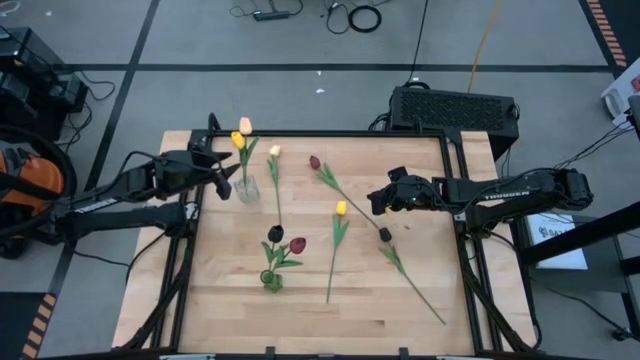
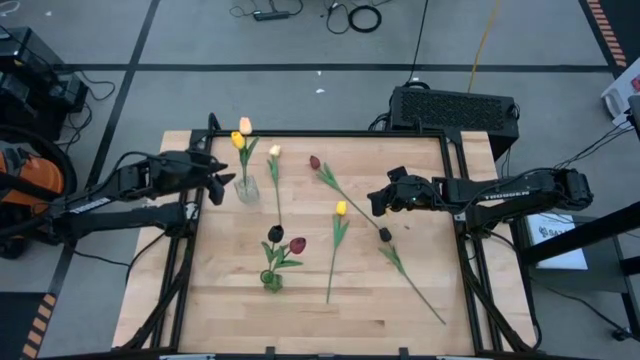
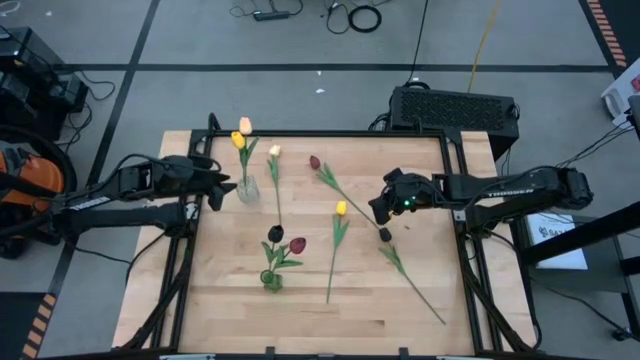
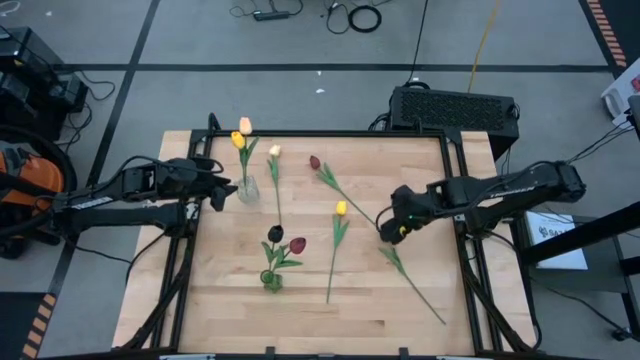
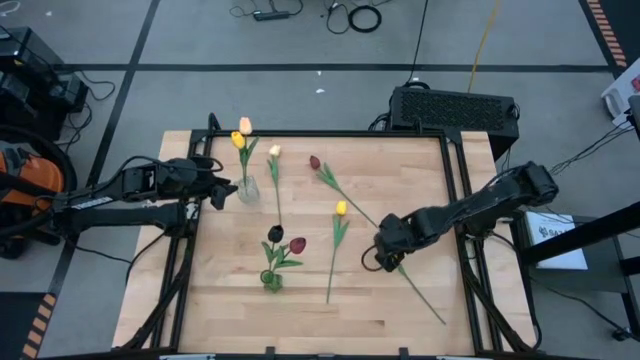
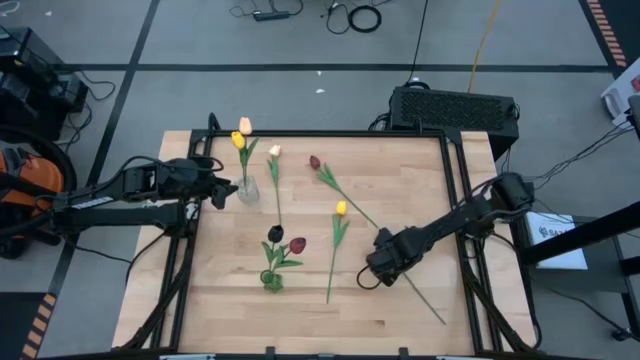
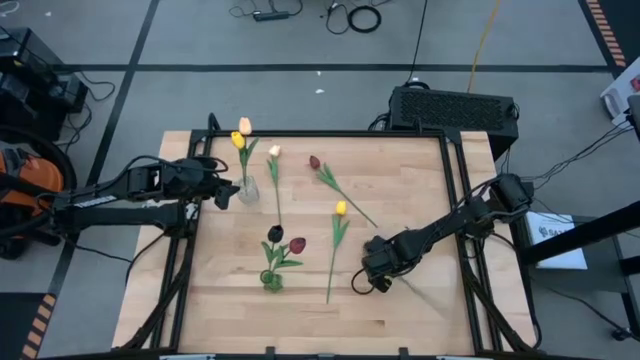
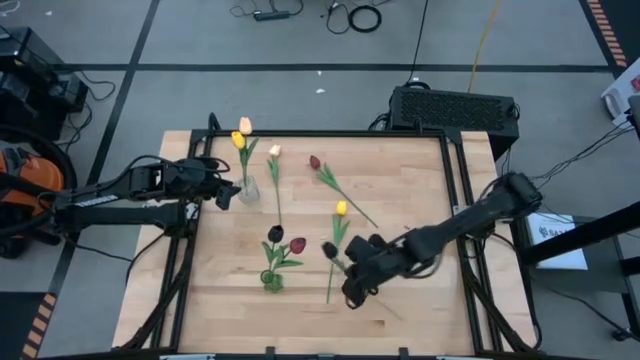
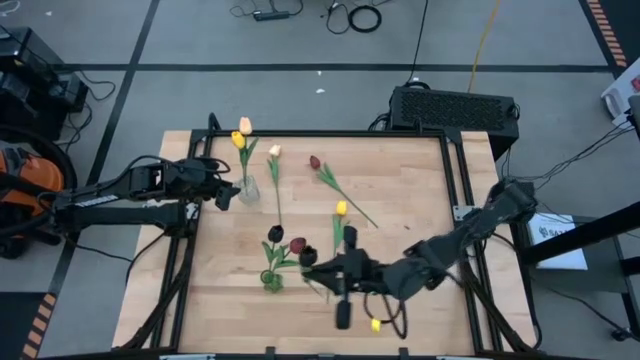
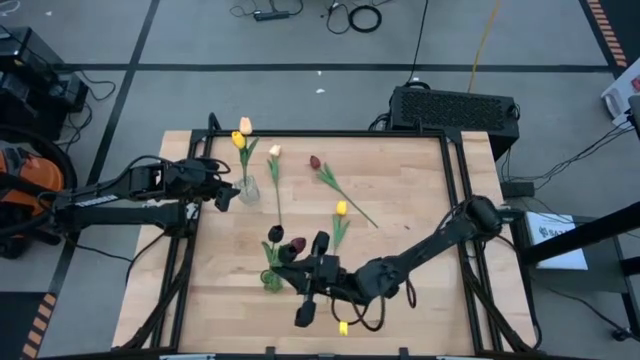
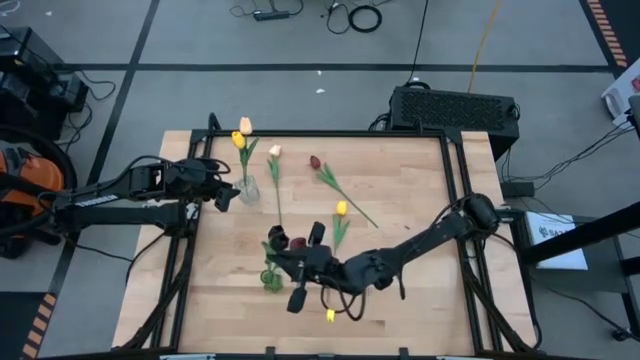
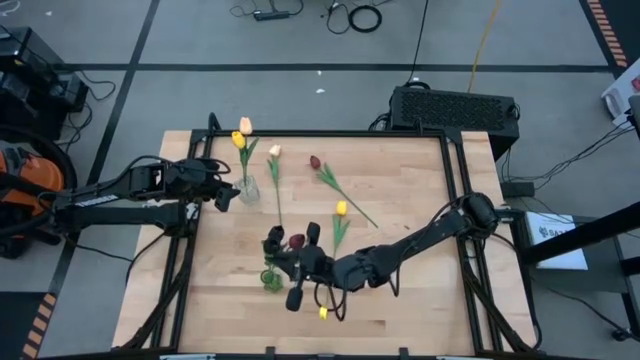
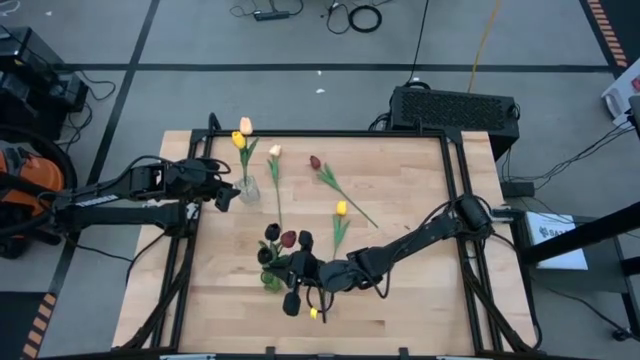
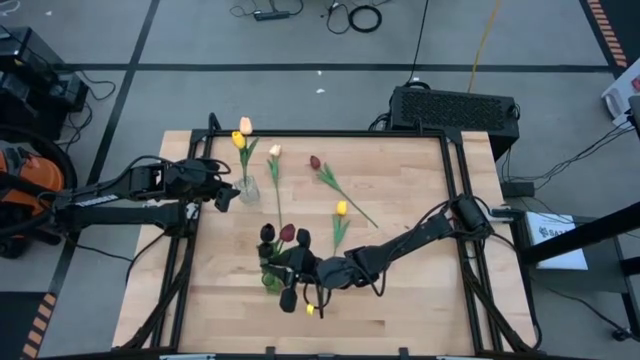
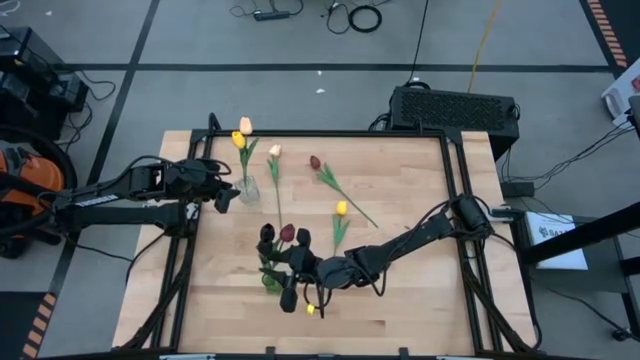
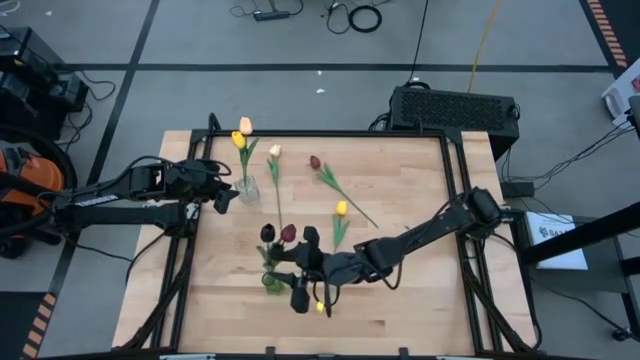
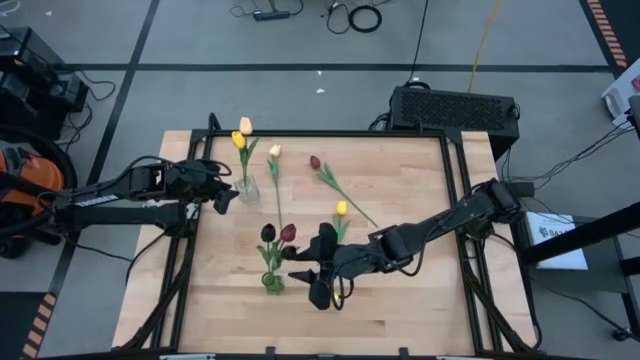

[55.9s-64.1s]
Task: Sort flowers into vase by color
Put the black tulip into the green vase

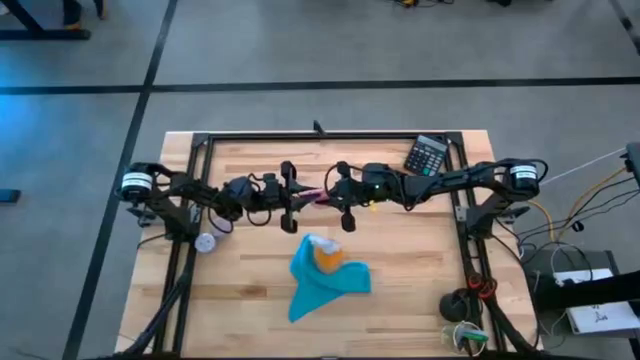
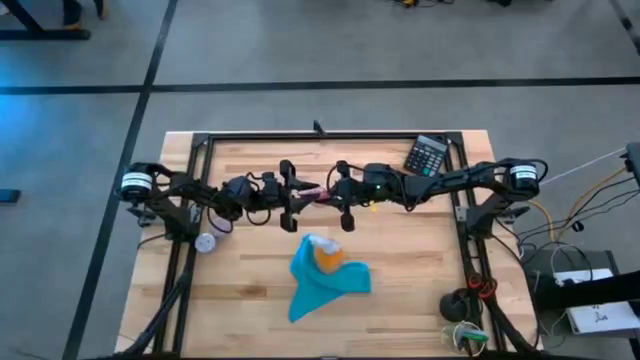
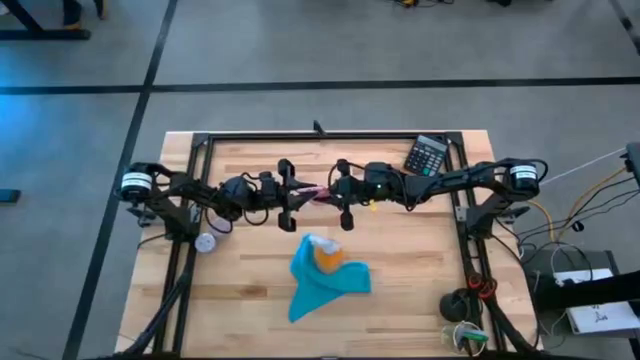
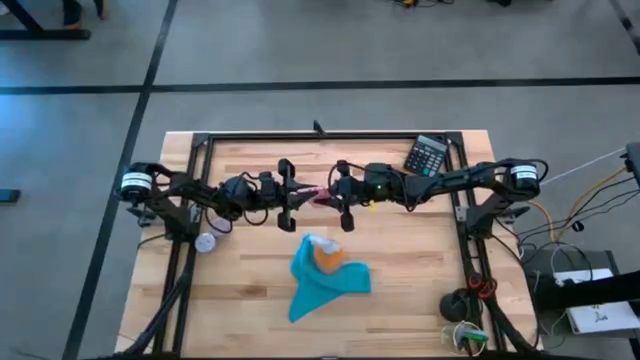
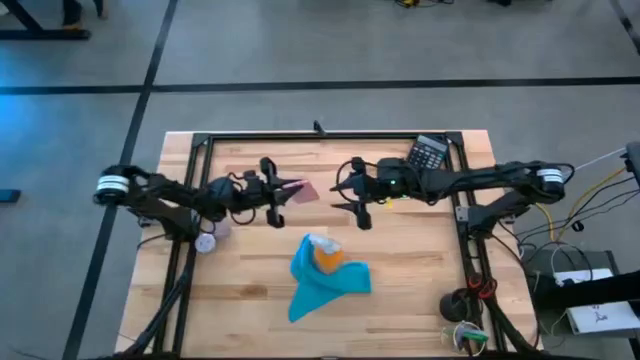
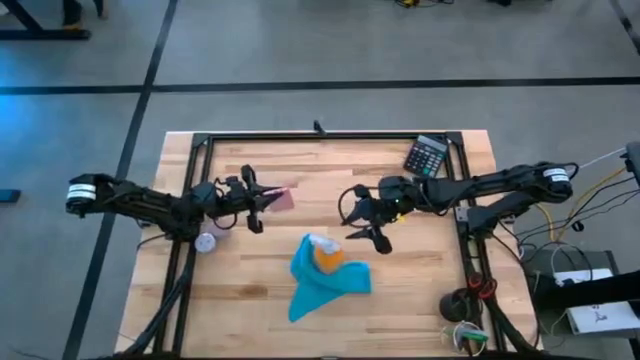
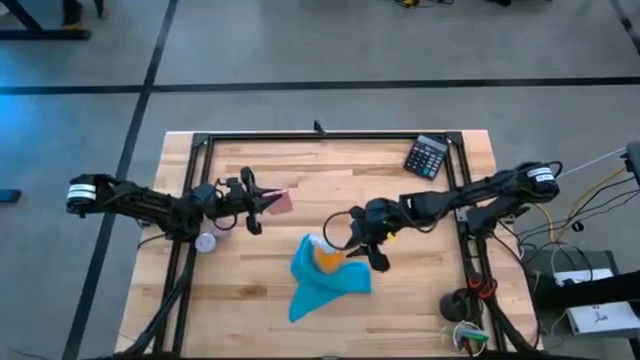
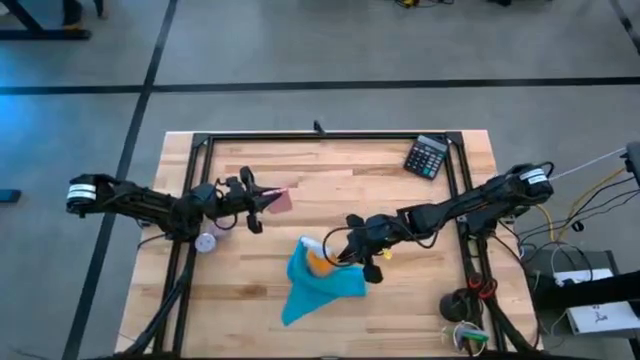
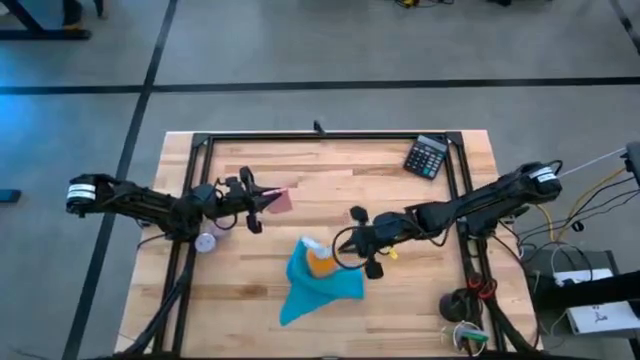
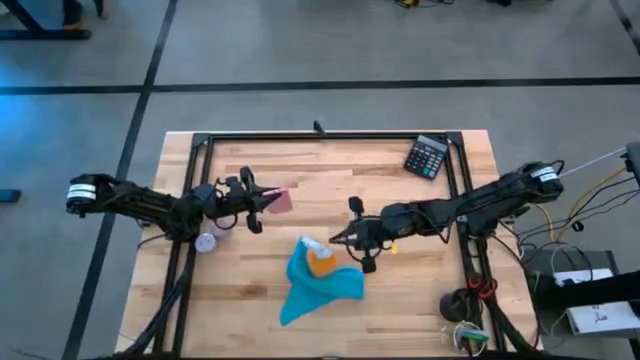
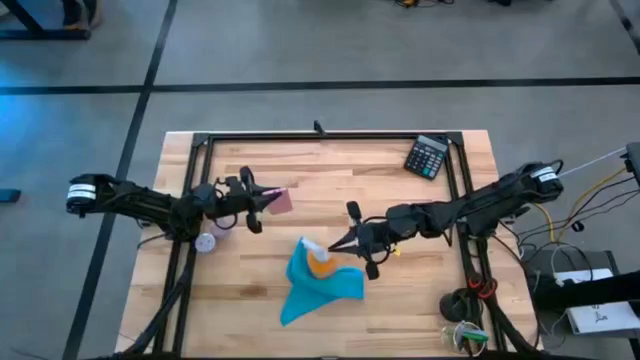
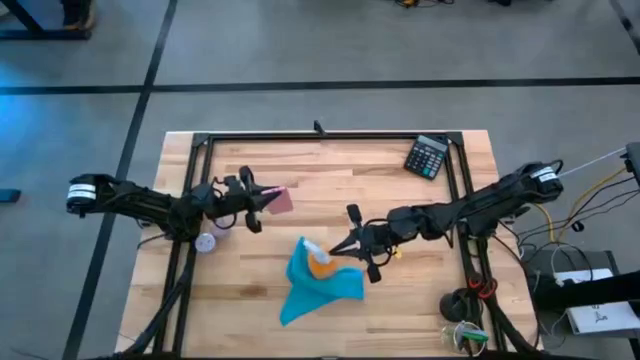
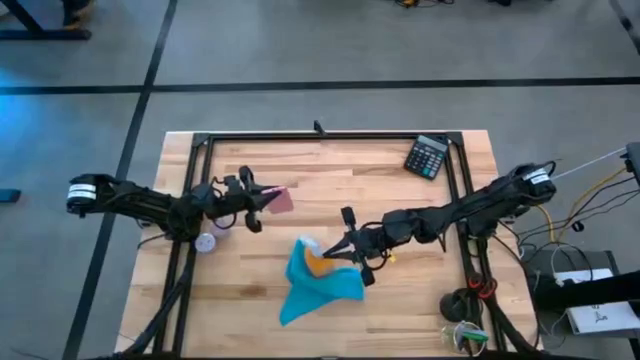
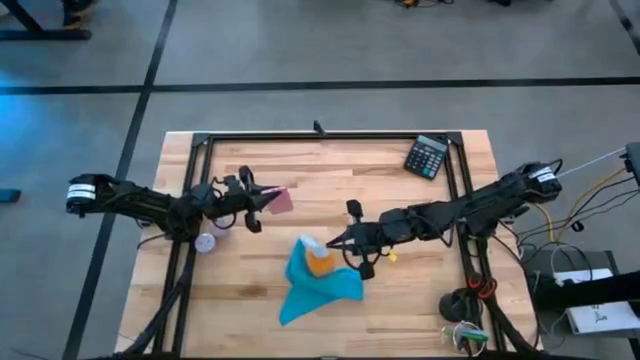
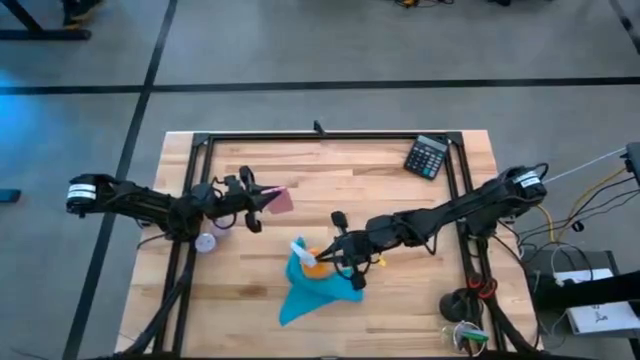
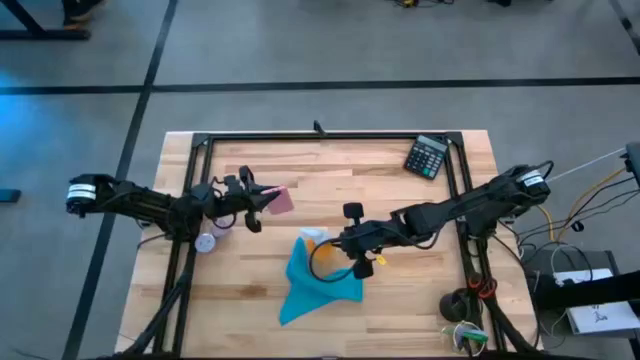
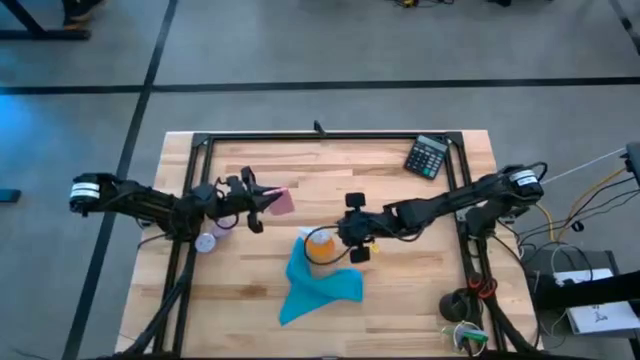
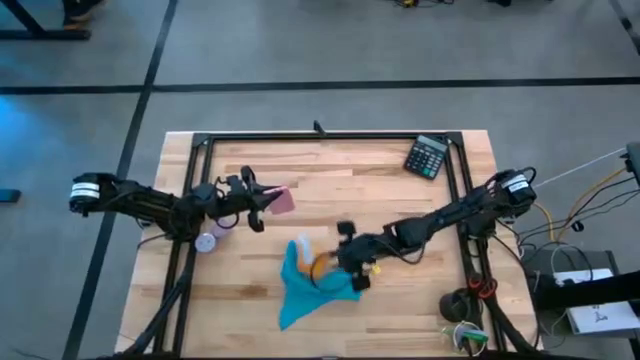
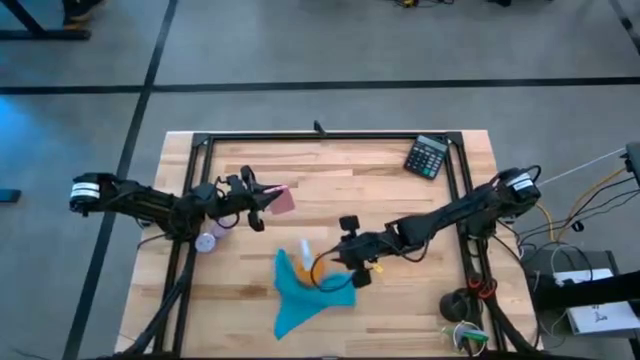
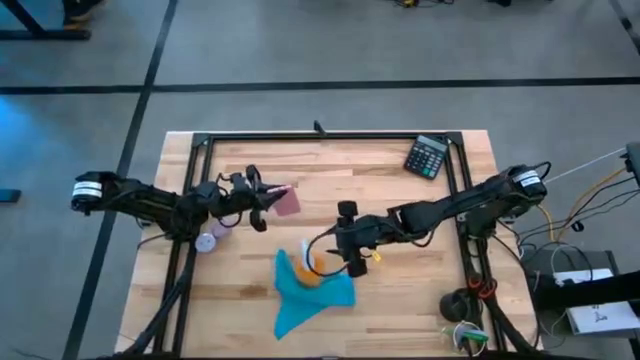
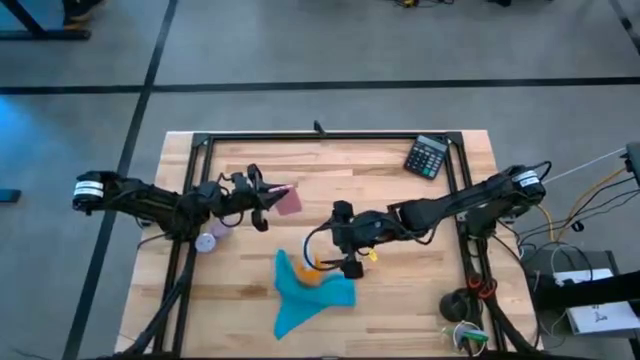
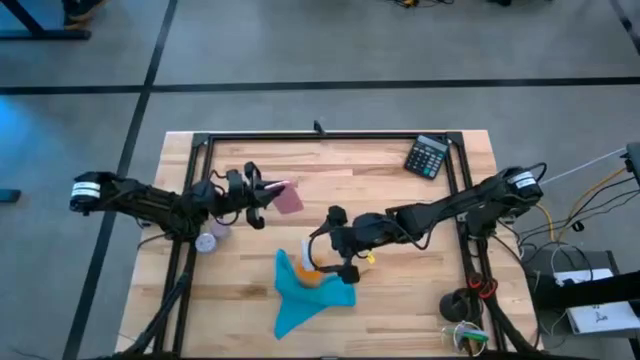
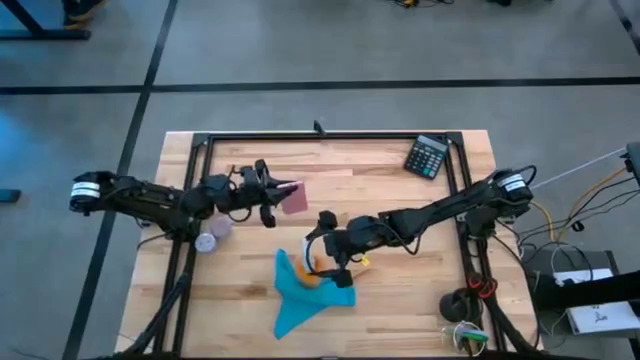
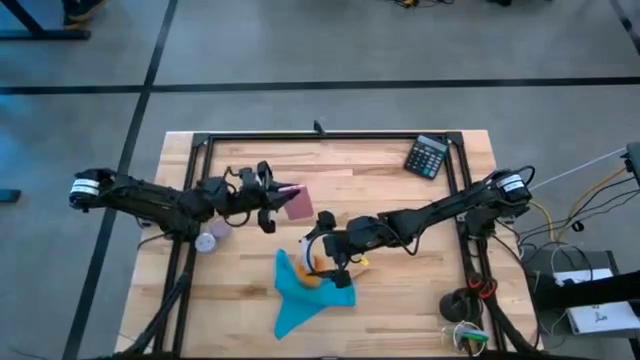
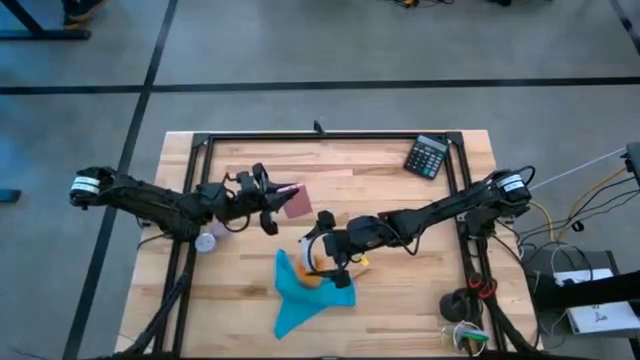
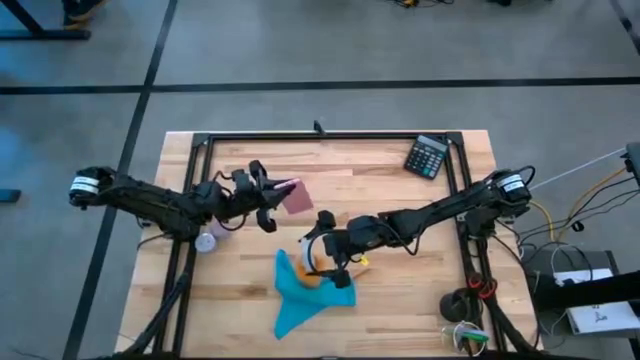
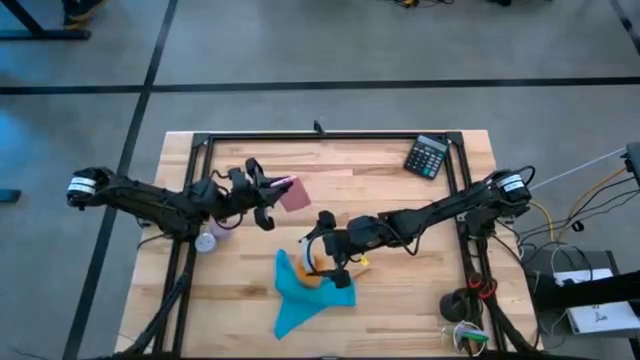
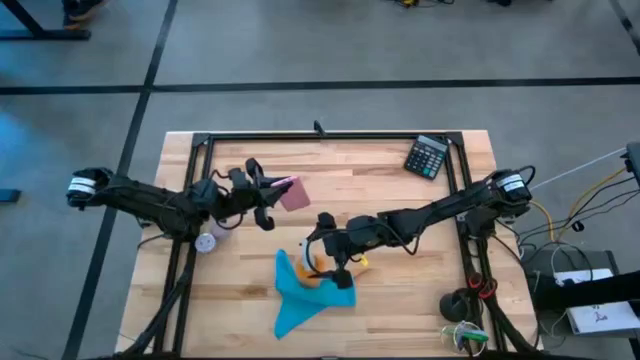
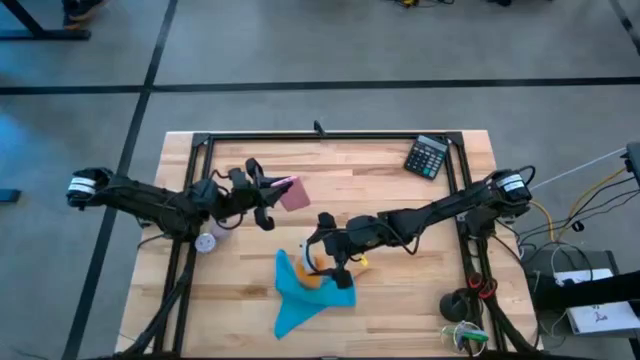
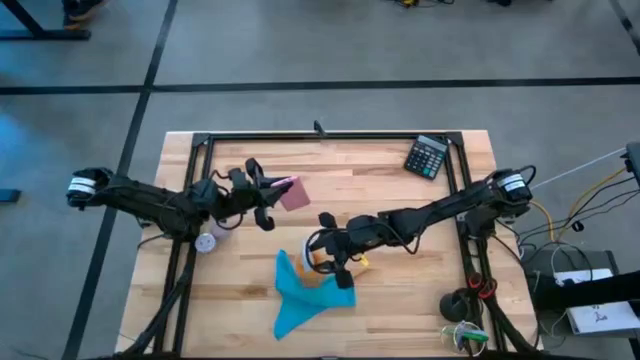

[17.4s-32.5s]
Task: Apply microfiber cloth
Spray the front of the pink cellphone using yellow spray bottle
